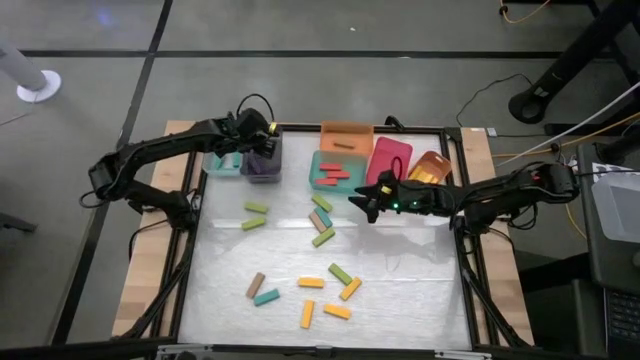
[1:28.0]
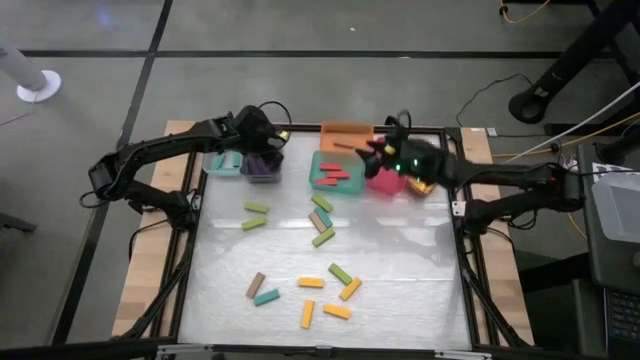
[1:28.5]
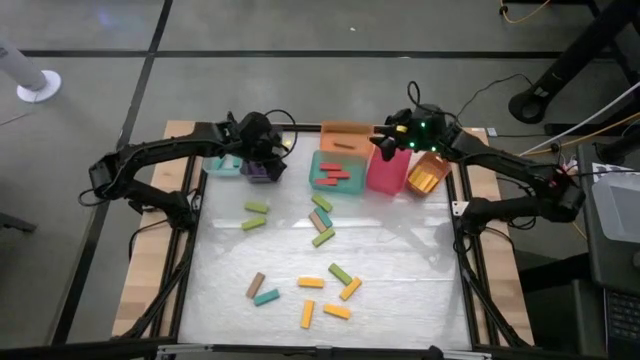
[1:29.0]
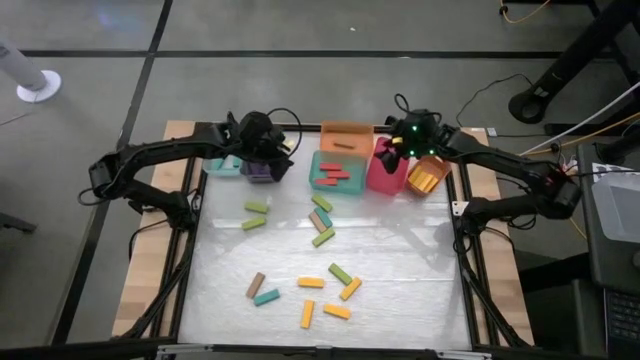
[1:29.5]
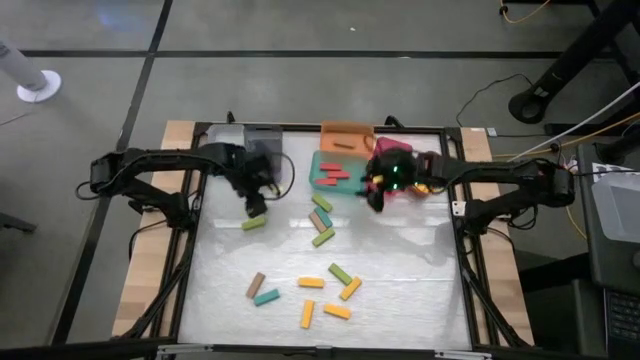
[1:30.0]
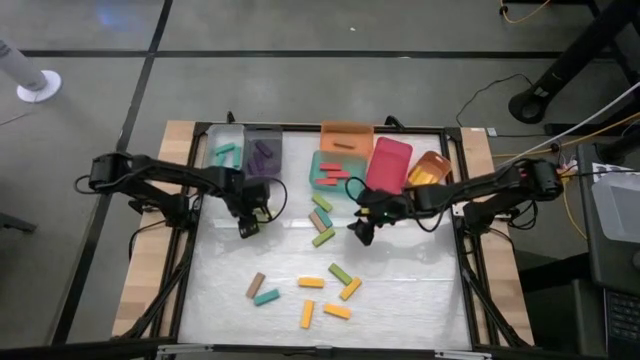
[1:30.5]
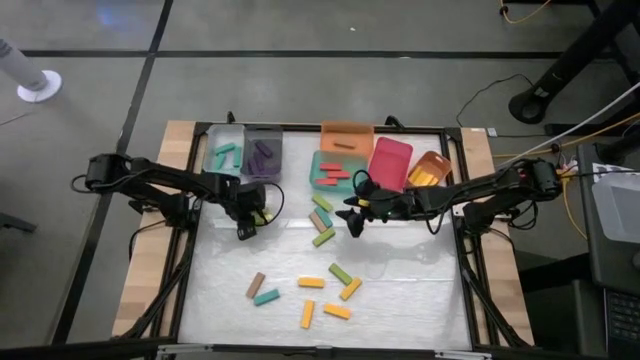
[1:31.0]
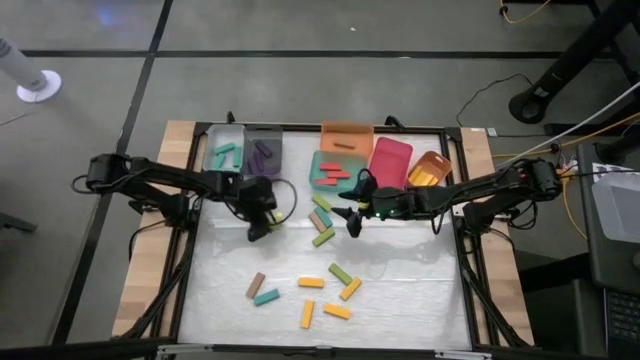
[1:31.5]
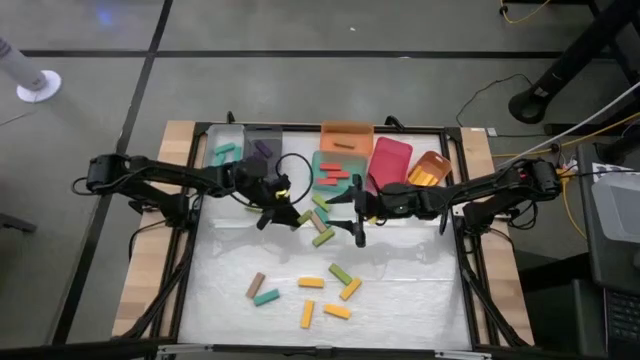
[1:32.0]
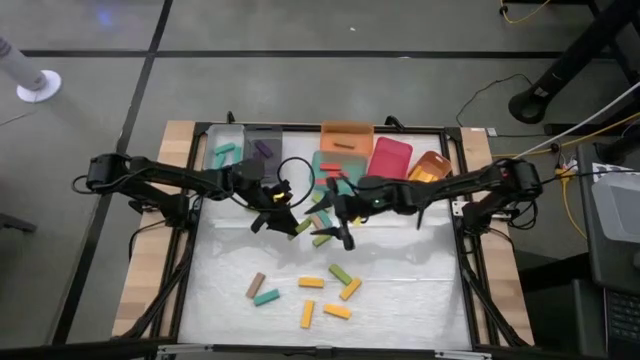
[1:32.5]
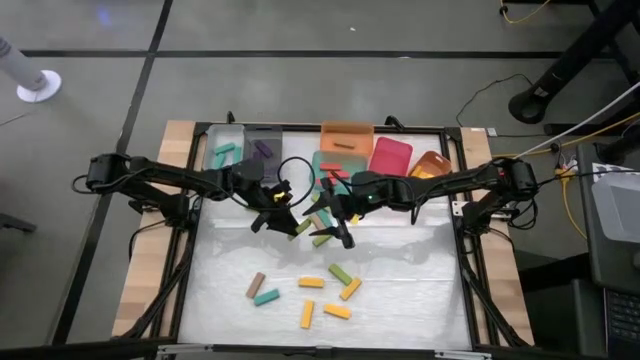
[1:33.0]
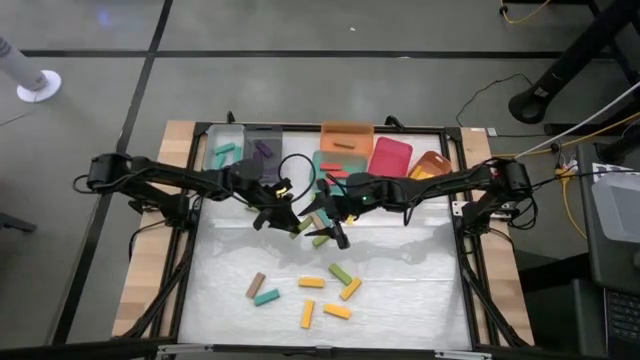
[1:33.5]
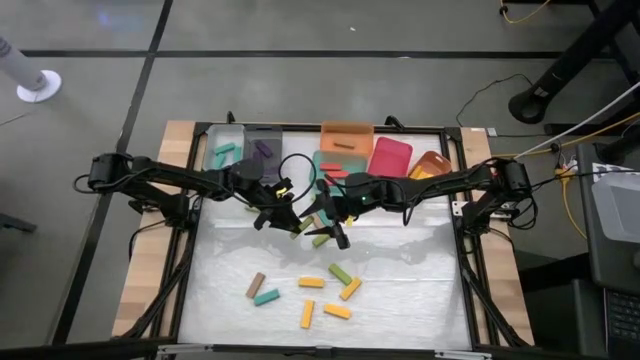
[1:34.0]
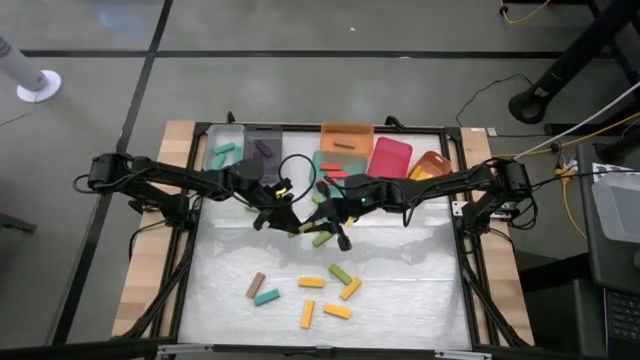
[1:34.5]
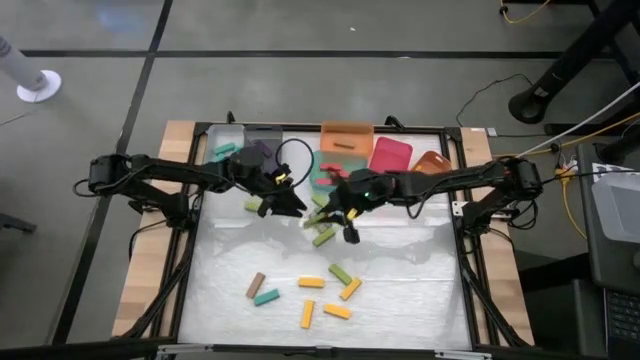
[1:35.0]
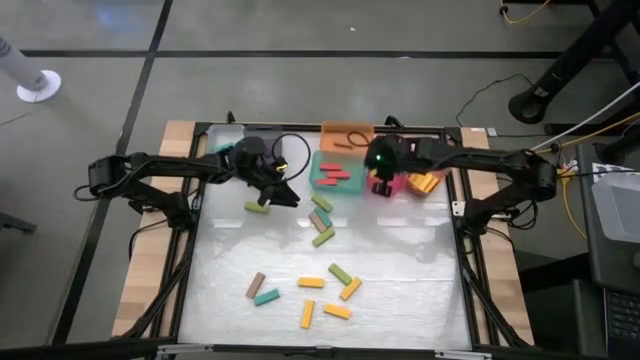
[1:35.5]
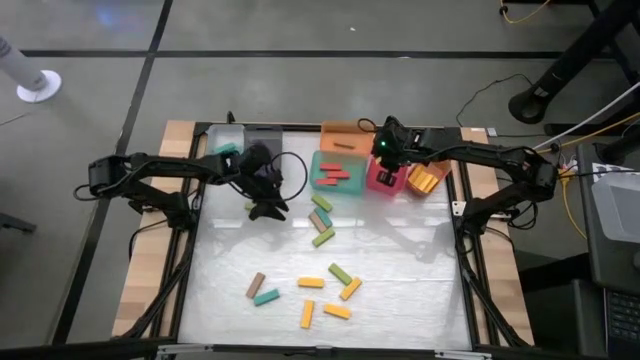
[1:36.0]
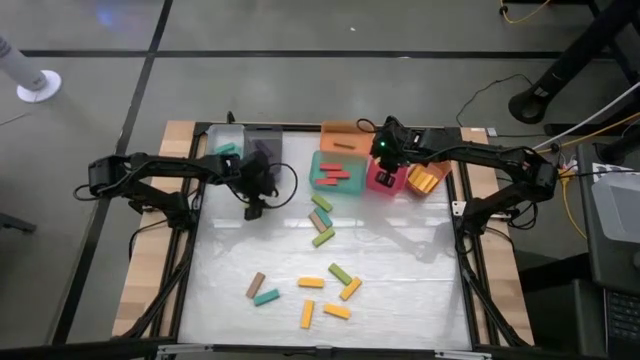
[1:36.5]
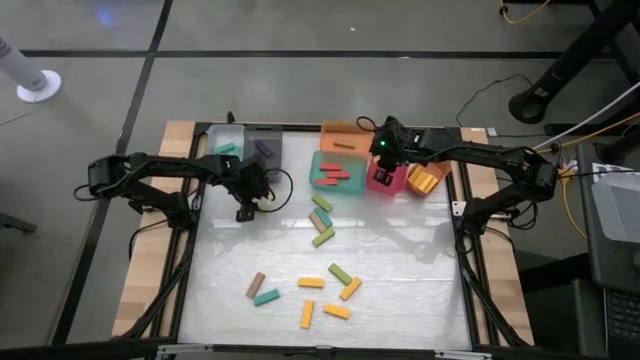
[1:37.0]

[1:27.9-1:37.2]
Task: Sort blocks
Put the light green block into the pink bin

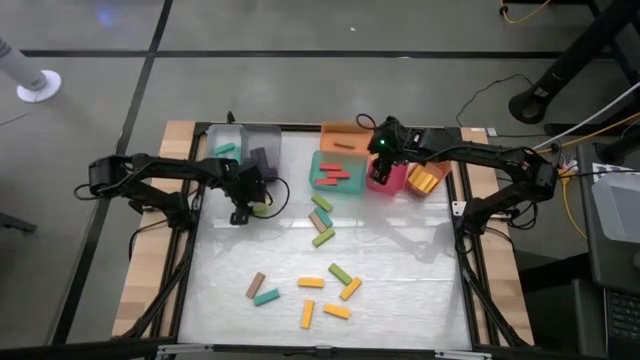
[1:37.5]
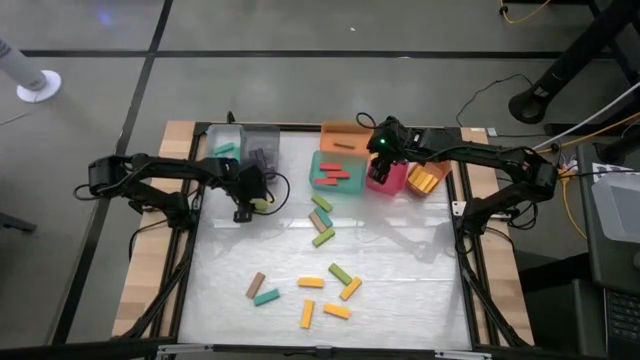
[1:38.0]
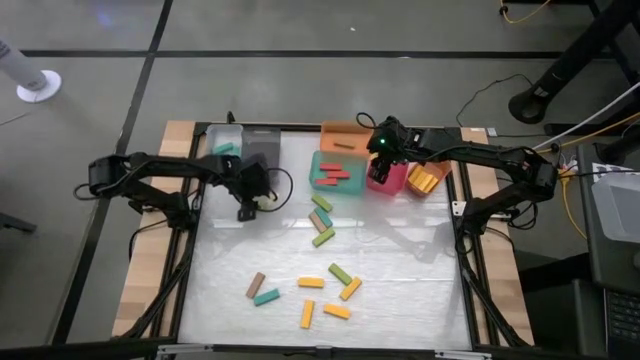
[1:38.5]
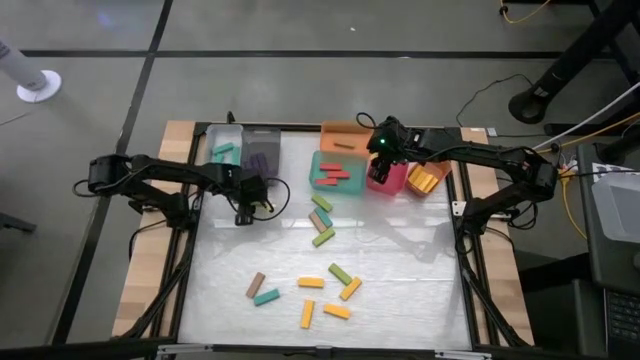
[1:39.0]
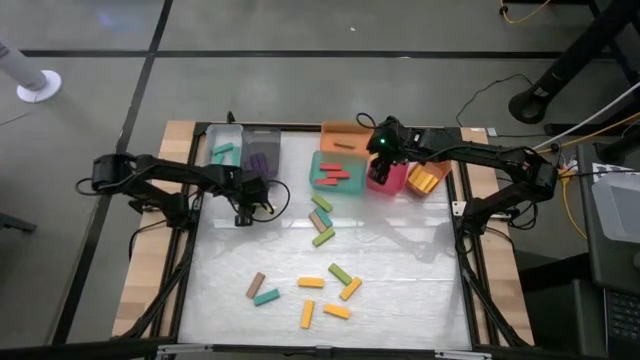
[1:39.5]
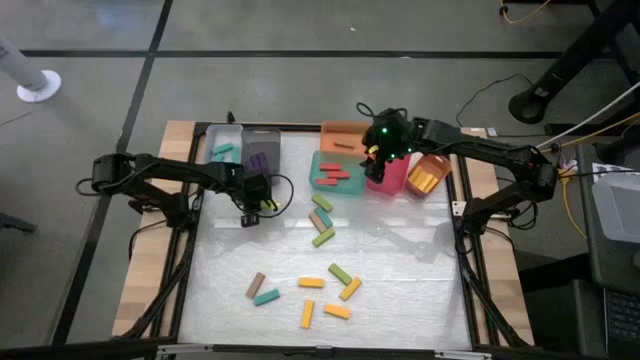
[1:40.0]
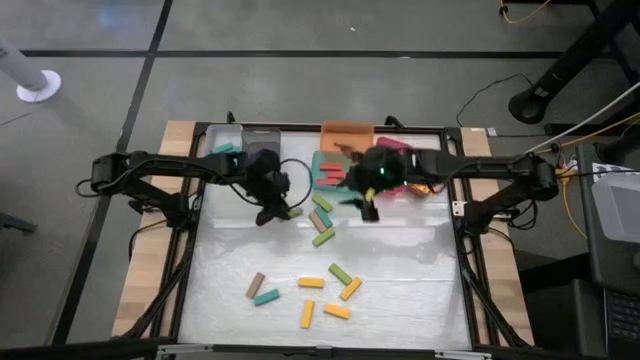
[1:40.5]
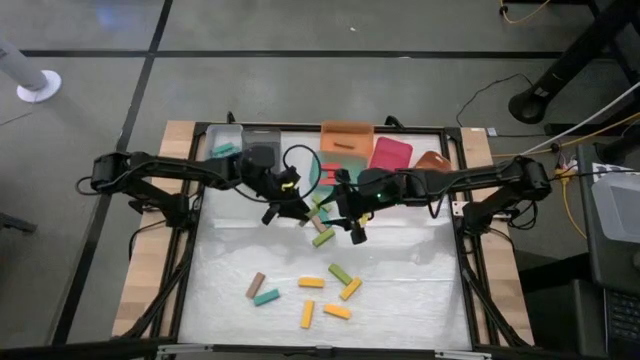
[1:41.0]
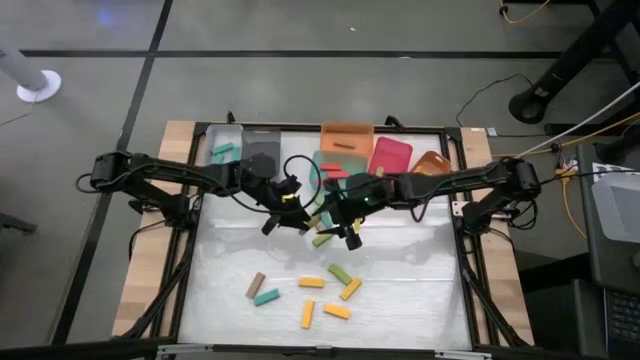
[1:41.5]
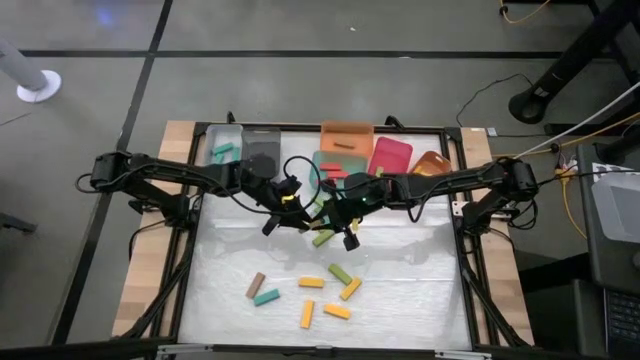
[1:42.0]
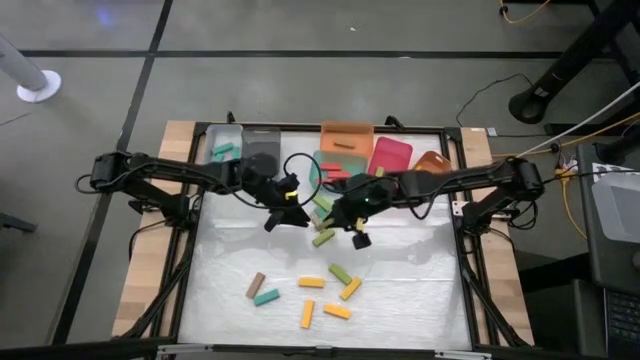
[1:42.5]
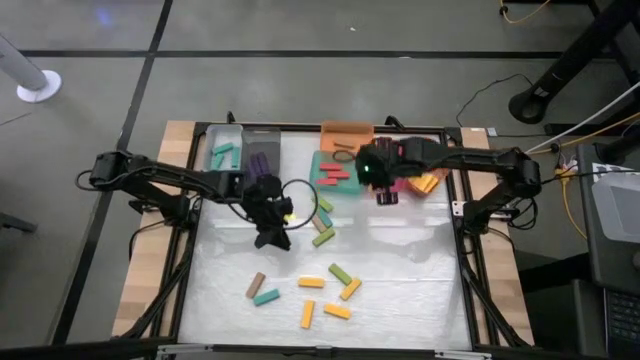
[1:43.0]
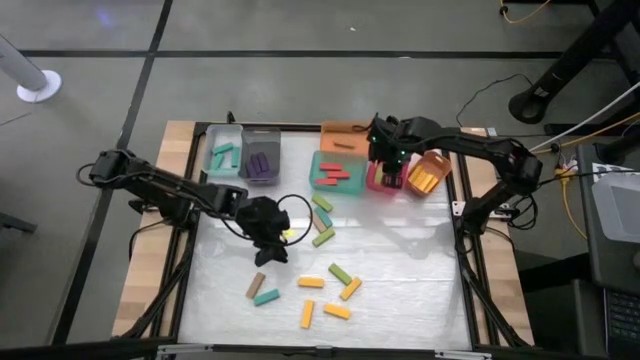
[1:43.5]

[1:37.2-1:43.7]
Put the light green block into the pink bin

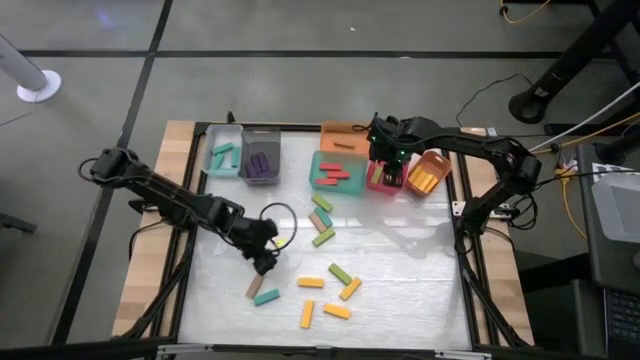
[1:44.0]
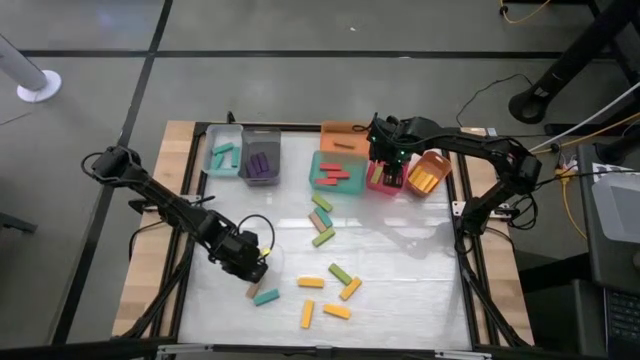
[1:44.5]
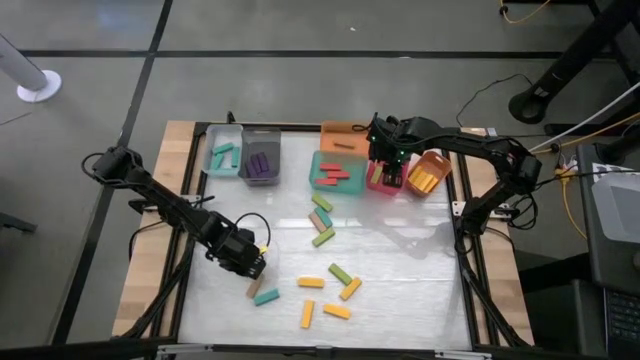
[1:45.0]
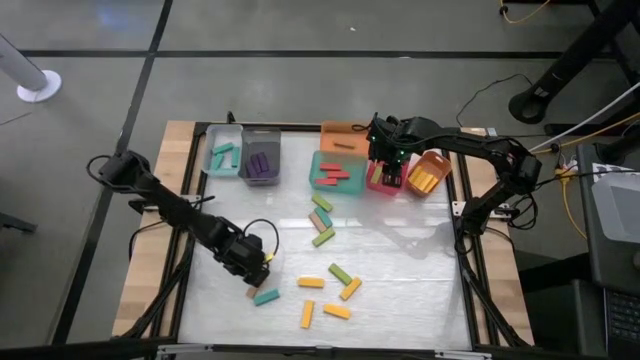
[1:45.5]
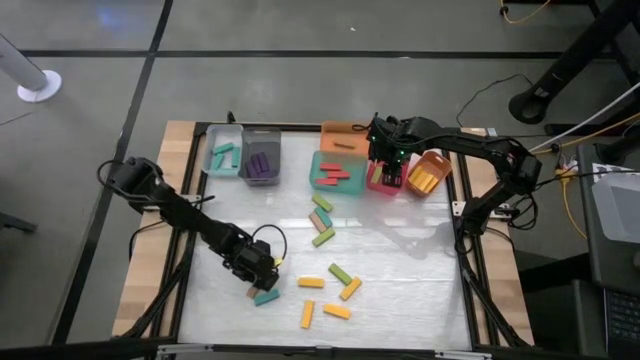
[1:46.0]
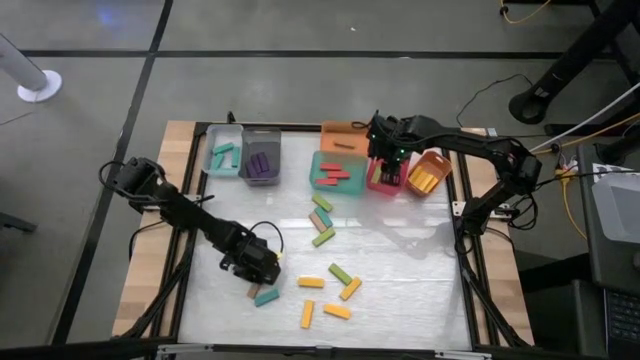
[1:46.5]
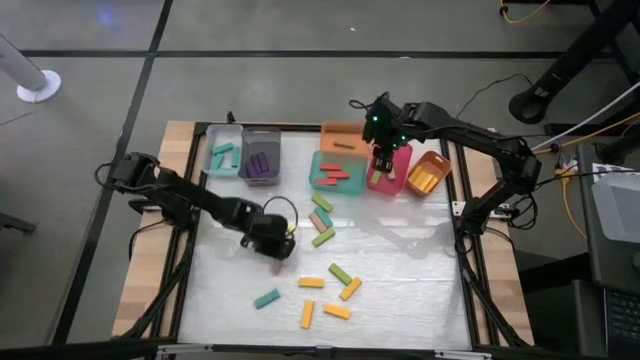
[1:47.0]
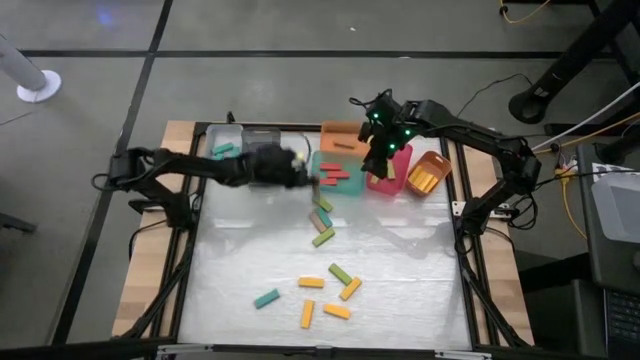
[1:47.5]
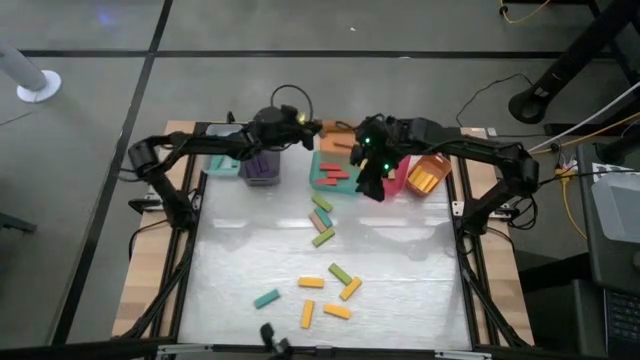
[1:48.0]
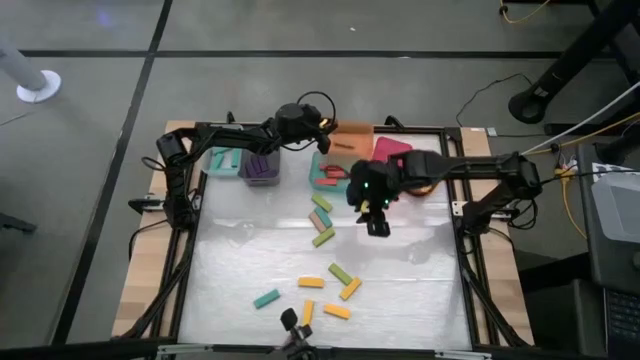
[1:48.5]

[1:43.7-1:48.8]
Put the brown block into the left orange bin
